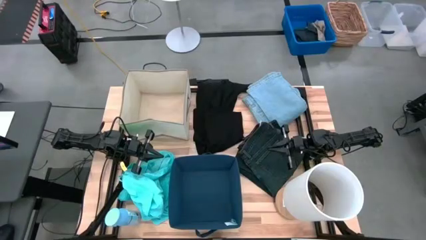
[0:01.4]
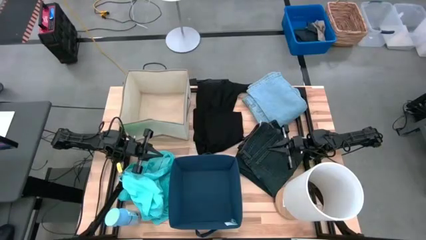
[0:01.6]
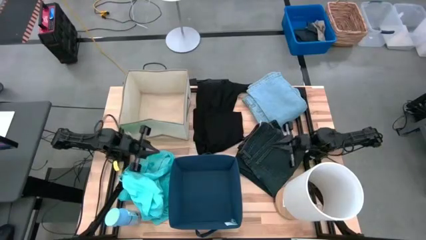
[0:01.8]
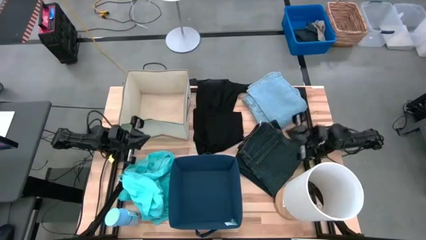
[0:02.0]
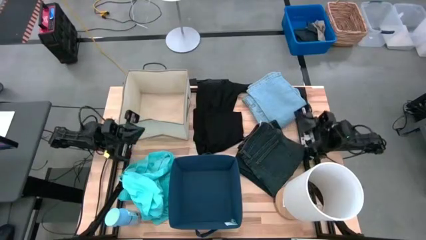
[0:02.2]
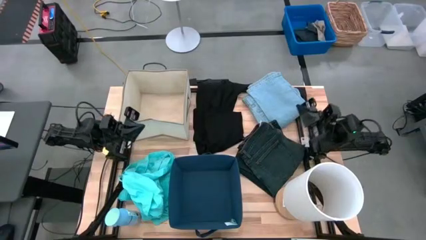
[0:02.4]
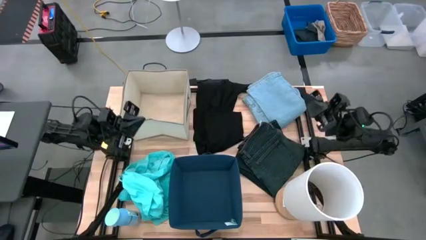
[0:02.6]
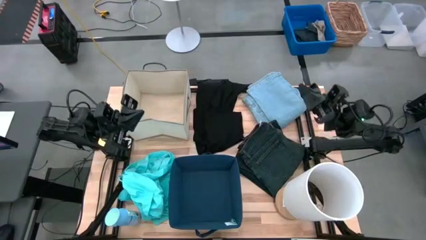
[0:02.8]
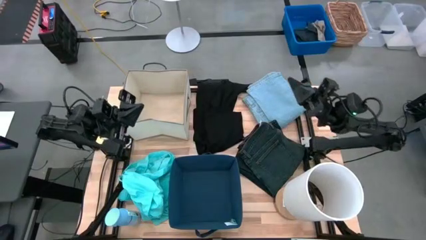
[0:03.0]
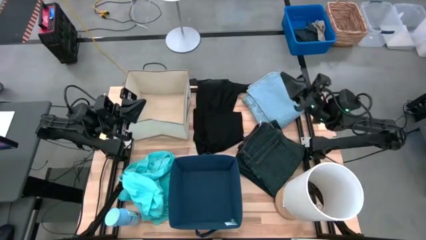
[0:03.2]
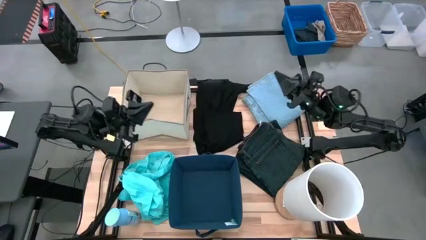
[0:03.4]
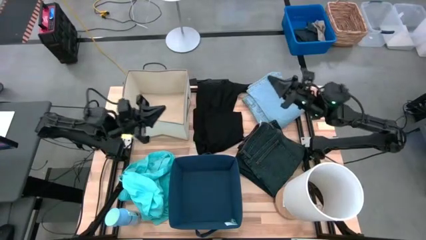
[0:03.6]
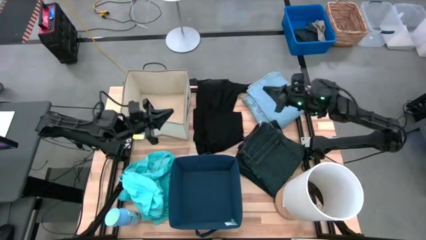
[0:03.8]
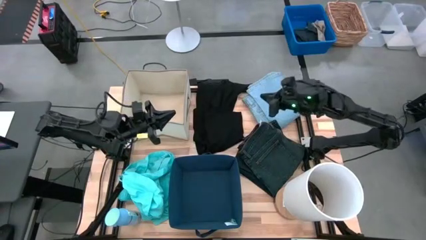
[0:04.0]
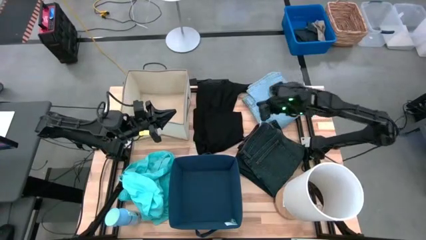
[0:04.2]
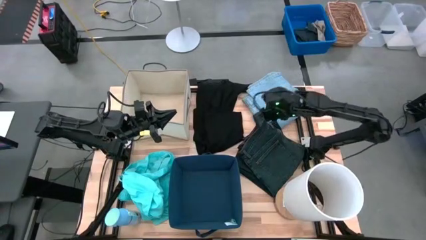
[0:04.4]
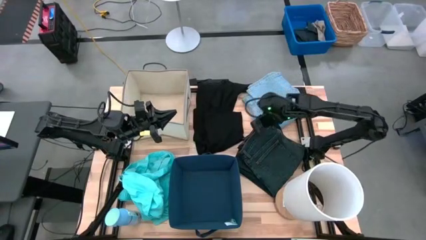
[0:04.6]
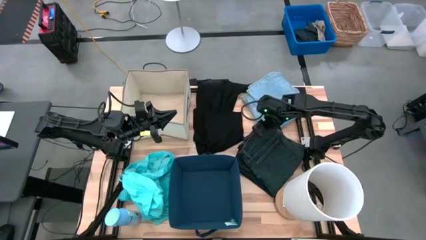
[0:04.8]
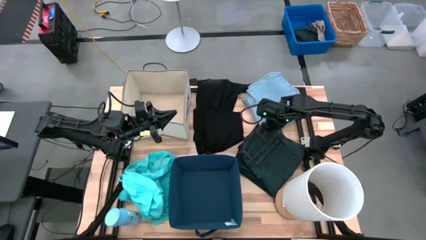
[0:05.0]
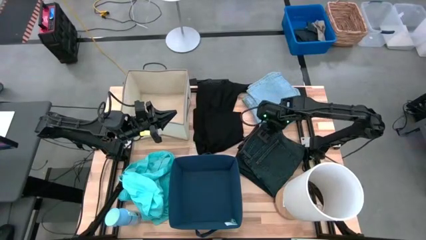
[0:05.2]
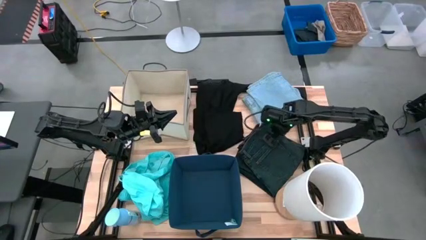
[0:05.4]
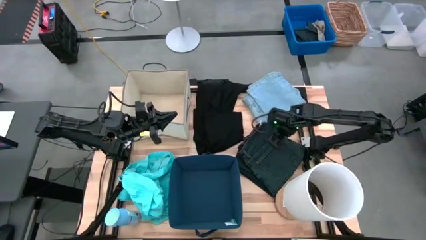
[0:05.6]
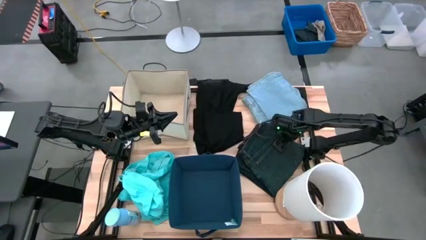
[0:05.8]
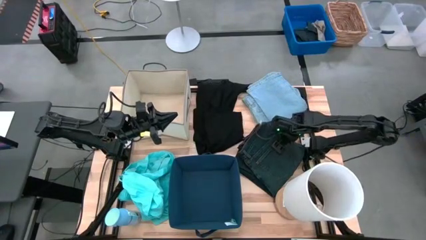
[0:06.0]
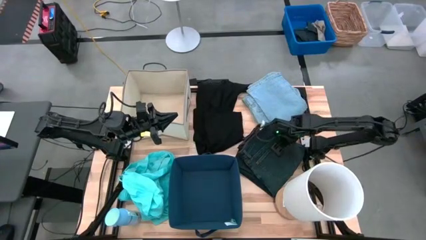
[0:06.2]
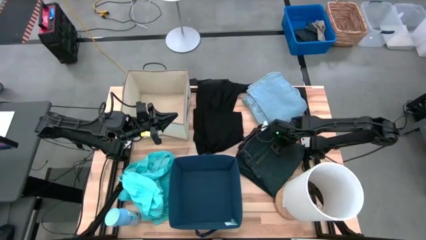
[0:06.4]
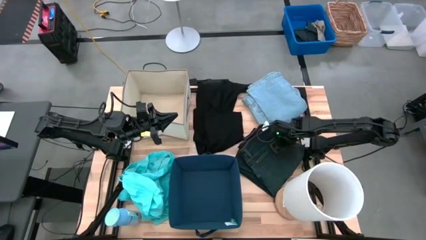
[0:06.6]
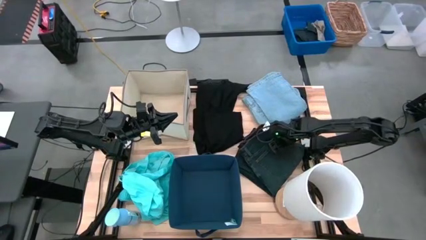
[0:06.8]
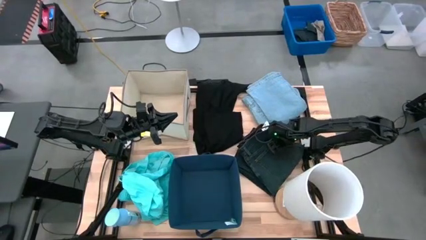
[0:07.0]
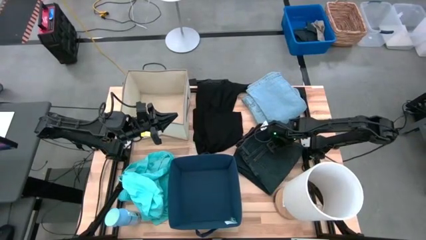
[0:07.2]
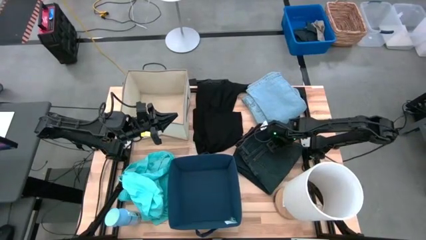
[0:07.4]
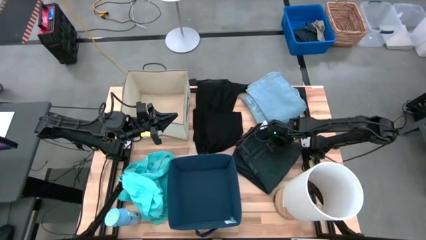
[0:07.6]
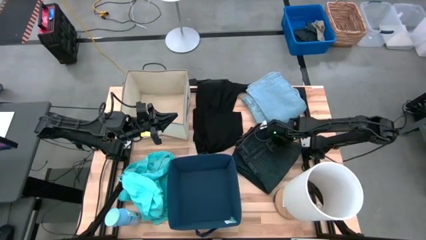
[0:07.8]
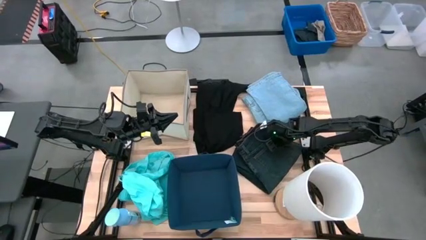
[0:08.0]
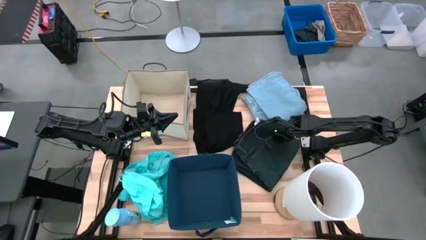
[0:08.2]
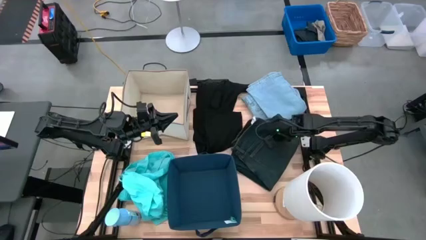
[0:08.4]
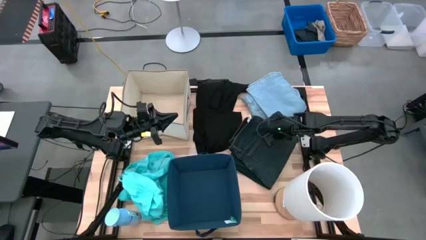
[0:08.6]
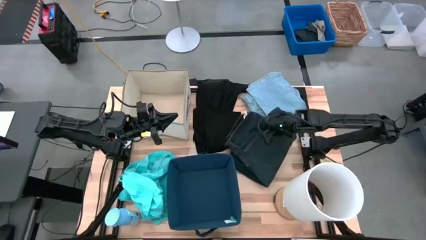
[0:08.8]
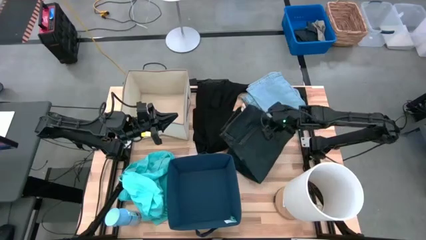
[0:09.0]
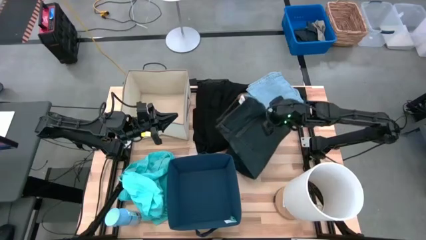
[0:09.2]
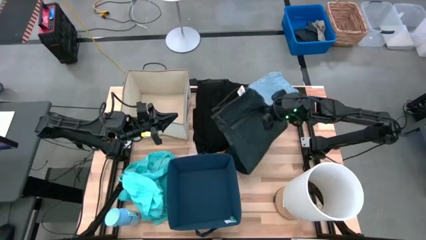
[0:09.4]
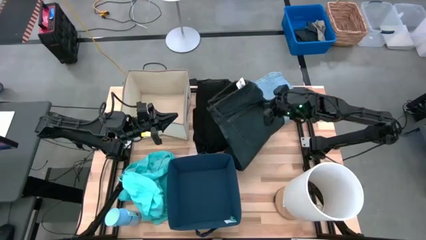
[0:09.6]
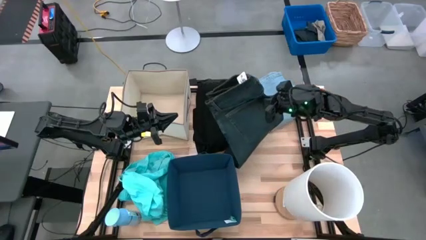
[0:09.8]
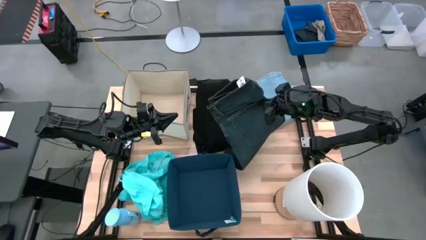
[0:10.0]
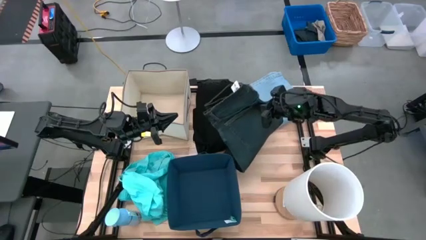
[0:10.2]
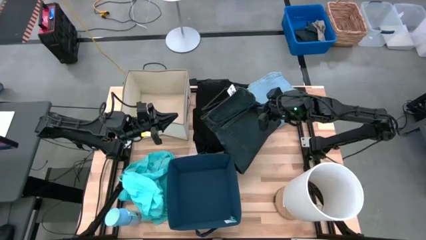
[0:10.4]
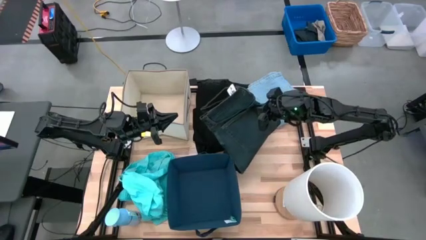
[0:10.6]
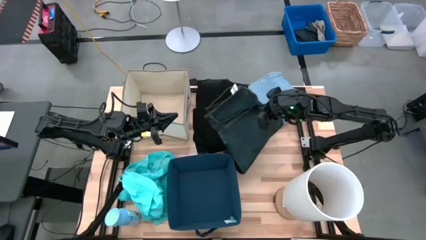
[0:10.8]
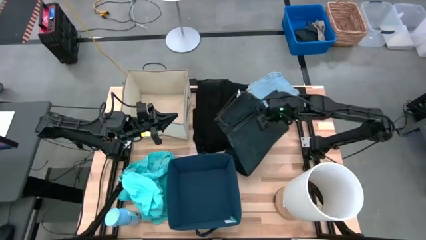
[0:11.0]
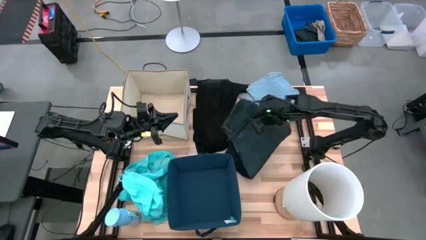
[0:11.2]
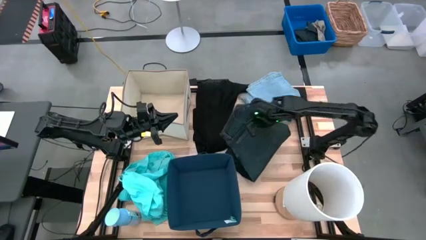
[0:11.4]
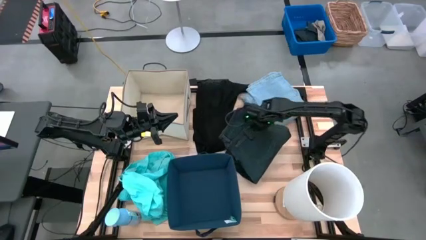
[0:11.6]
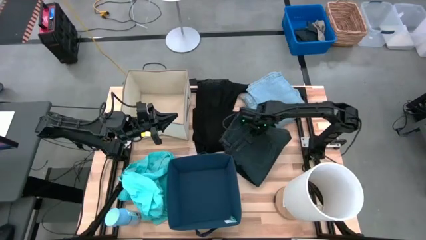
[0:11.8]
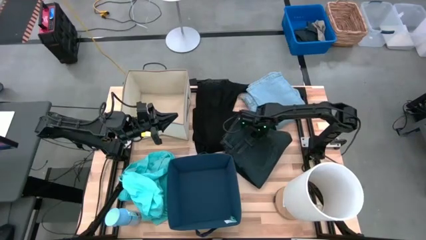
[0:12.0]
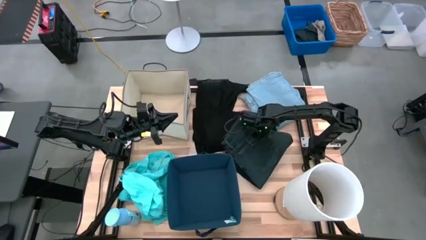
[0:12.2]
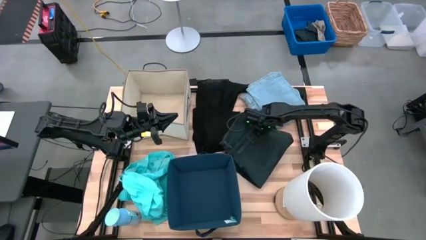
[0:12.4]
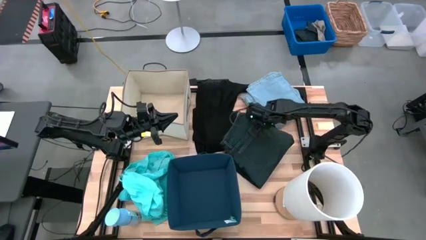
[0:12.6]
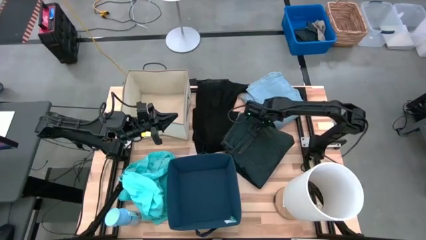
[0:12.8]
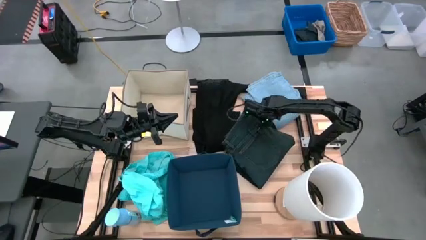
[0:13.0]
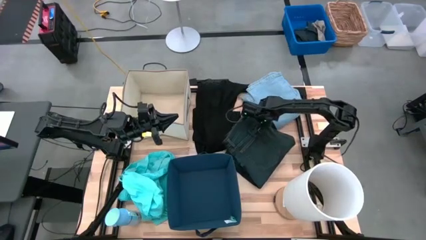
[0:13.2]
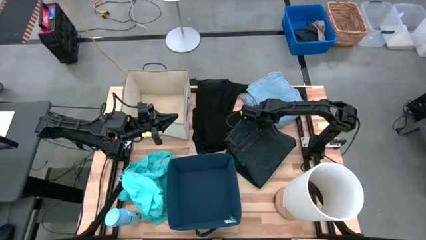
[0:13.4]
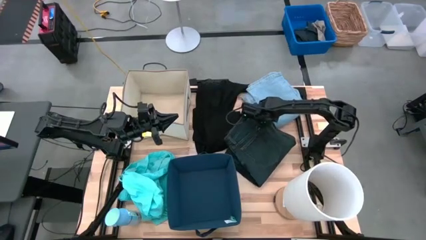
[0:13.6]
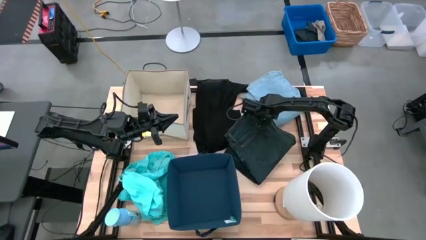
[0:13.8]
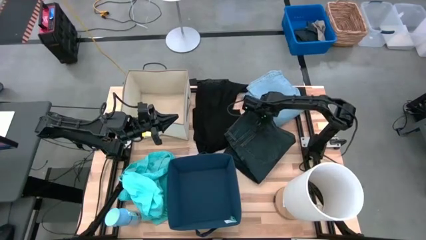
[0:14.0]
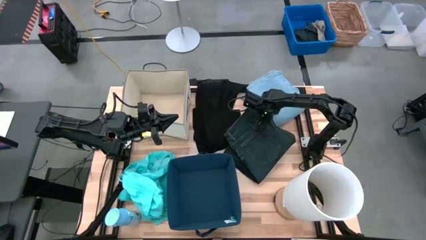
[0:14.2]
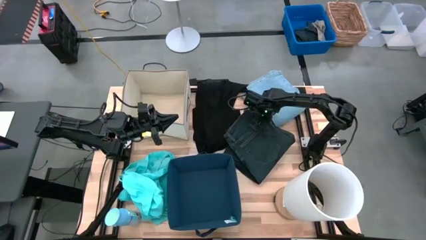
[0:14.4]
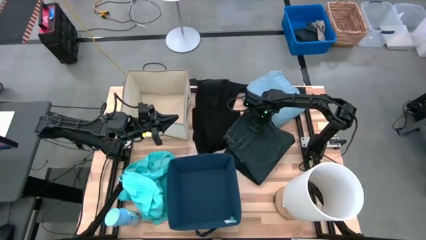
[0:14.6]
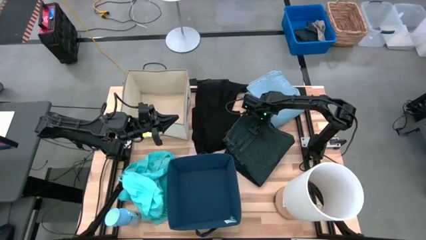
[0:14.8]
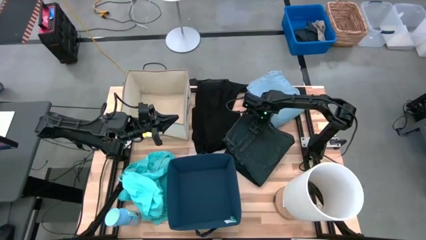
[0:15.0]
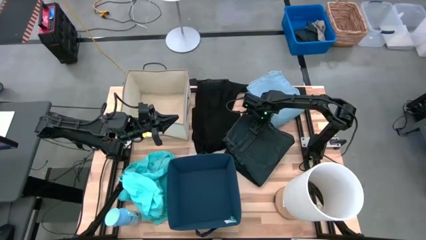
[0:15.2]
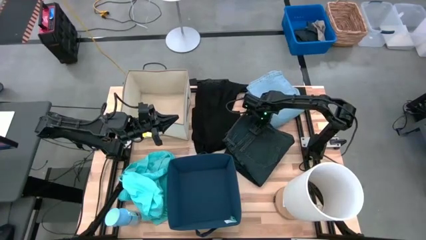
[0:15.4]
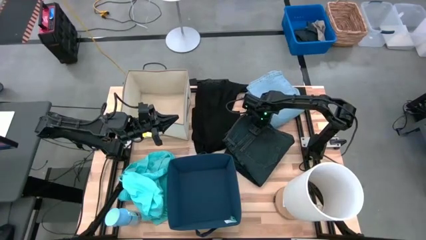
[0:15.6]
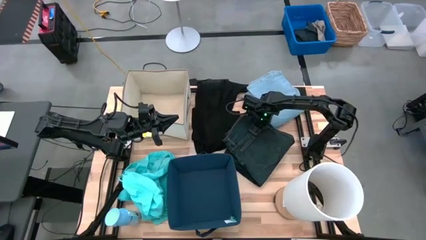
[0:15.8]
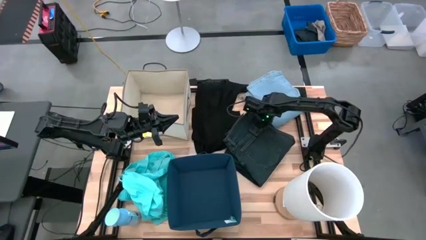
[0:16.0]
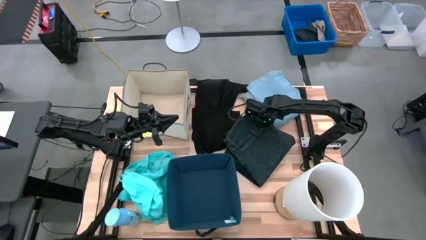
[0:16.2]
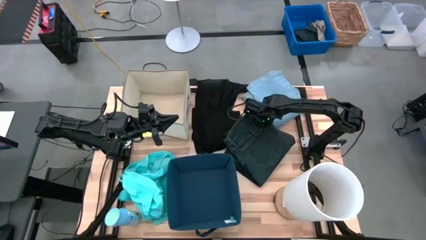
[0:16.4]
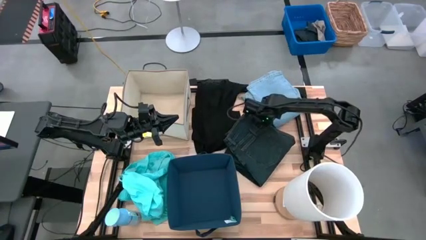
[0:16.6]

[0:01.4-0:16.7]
Task: Sort clothes
Put the black denim jeans into the blue laundry bin
